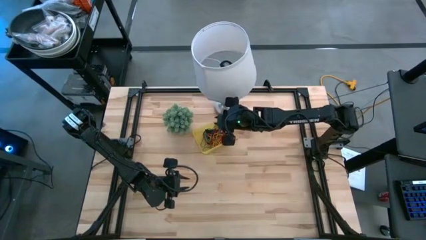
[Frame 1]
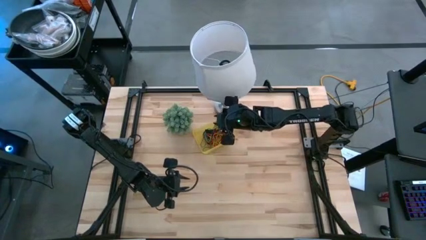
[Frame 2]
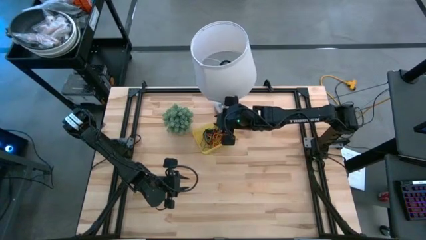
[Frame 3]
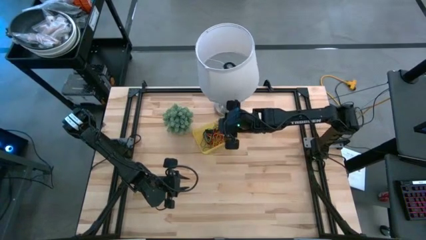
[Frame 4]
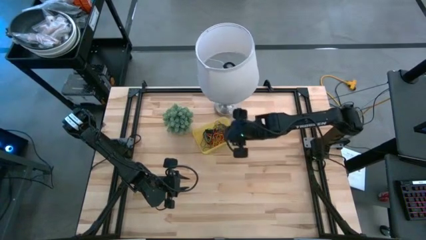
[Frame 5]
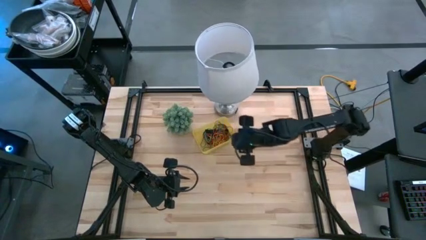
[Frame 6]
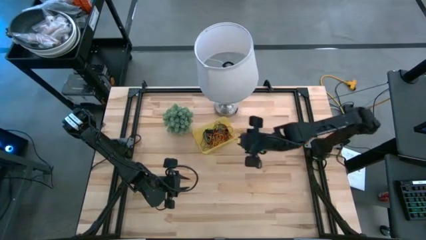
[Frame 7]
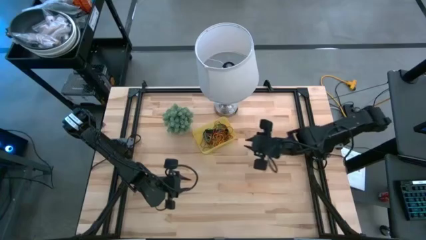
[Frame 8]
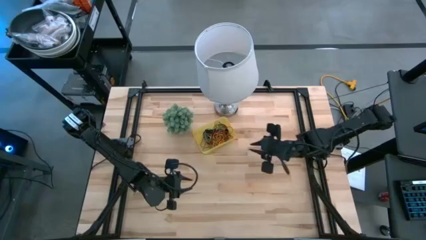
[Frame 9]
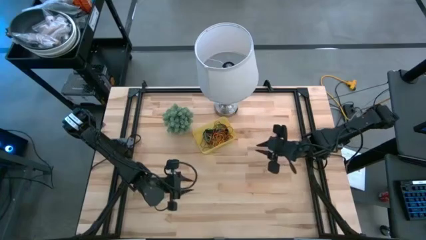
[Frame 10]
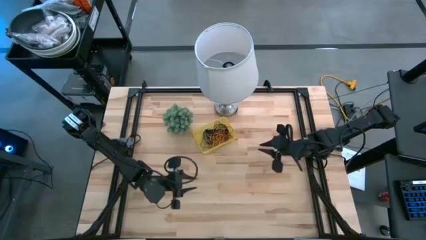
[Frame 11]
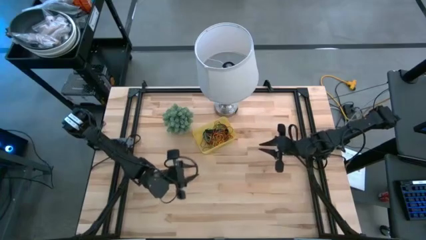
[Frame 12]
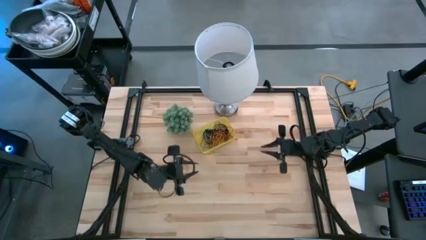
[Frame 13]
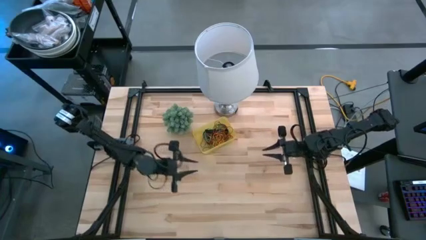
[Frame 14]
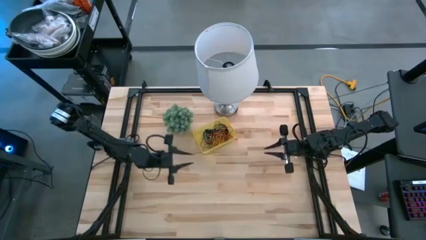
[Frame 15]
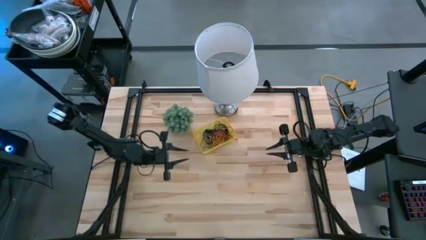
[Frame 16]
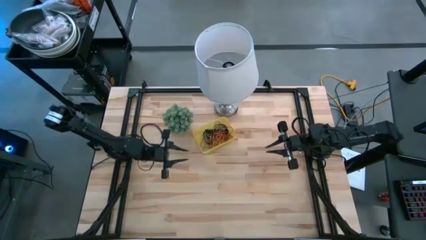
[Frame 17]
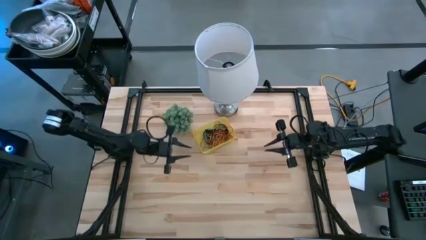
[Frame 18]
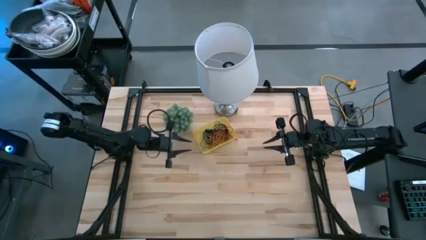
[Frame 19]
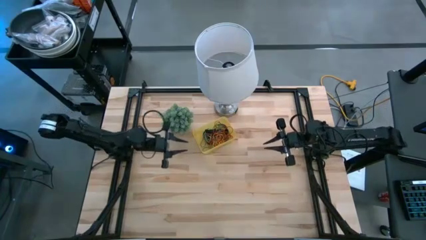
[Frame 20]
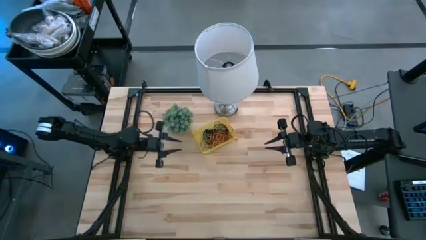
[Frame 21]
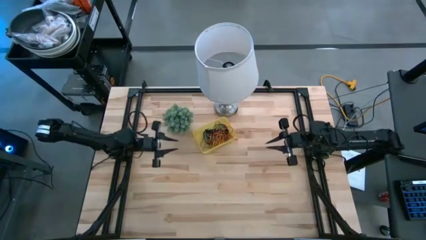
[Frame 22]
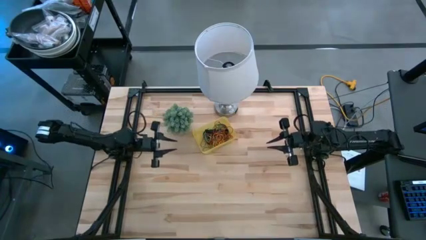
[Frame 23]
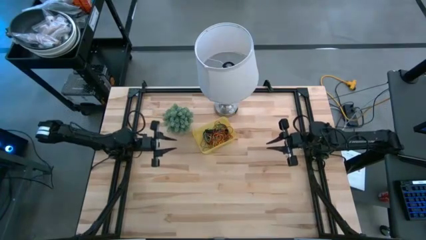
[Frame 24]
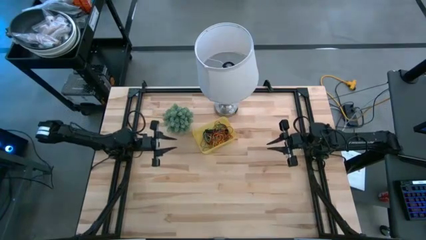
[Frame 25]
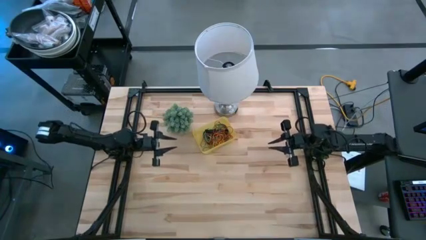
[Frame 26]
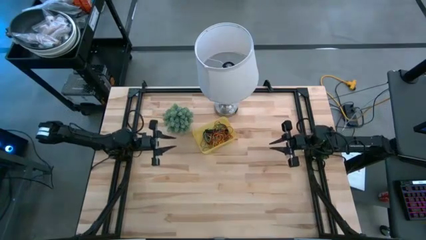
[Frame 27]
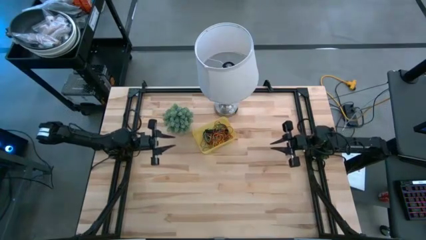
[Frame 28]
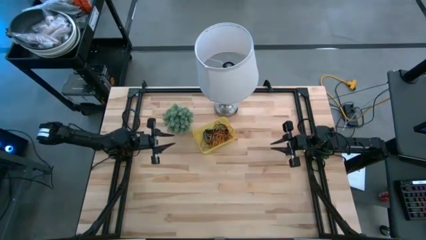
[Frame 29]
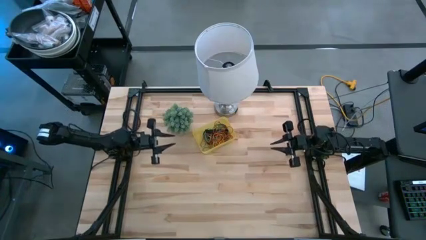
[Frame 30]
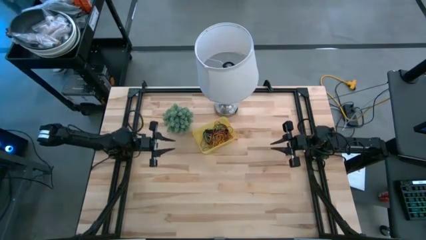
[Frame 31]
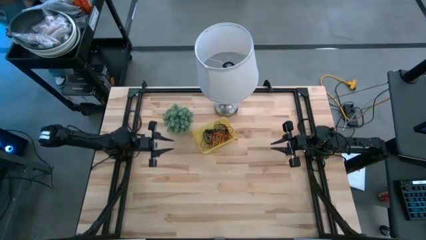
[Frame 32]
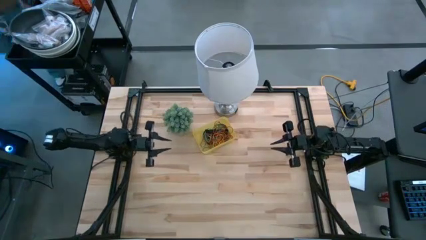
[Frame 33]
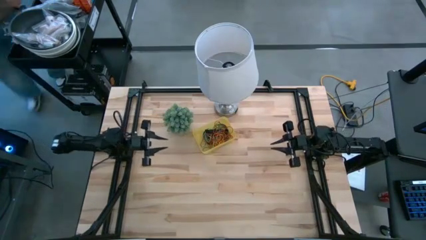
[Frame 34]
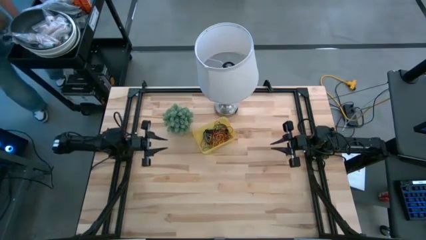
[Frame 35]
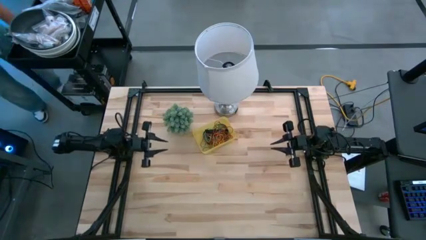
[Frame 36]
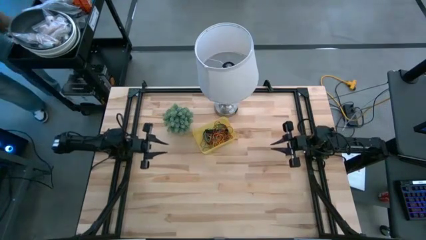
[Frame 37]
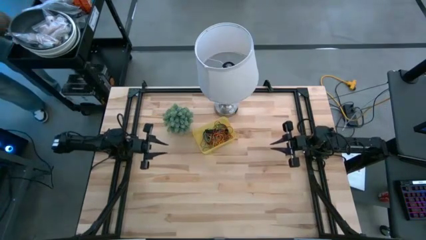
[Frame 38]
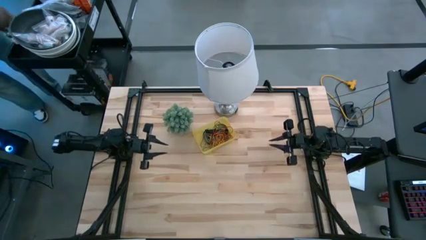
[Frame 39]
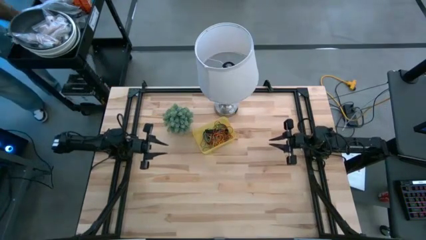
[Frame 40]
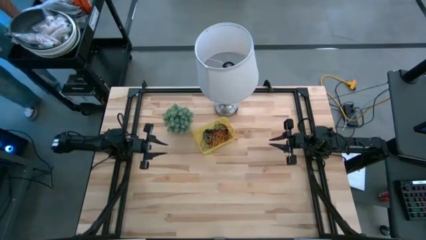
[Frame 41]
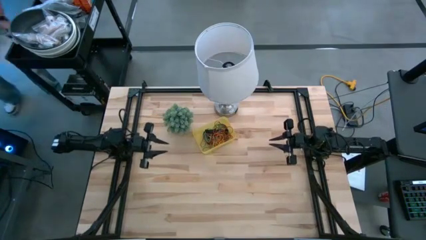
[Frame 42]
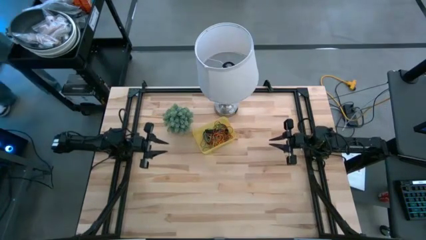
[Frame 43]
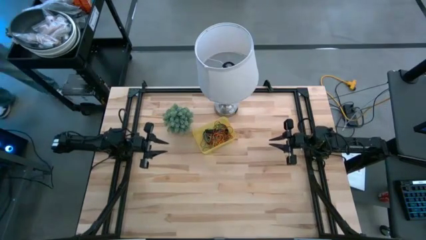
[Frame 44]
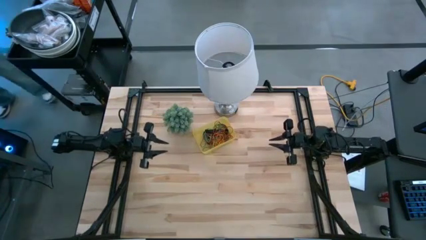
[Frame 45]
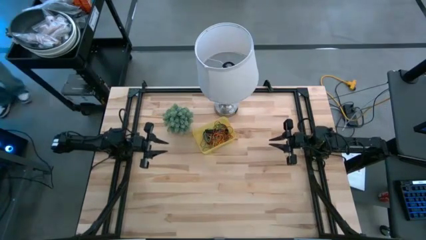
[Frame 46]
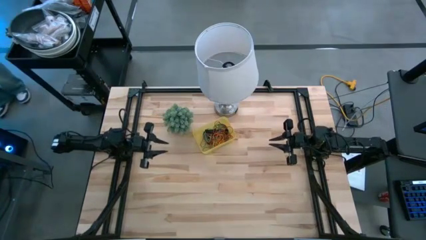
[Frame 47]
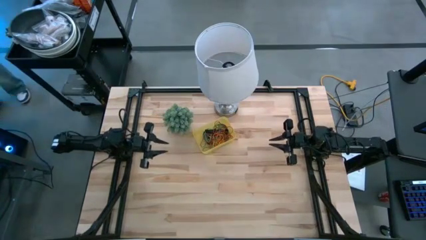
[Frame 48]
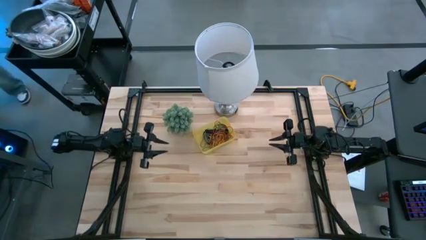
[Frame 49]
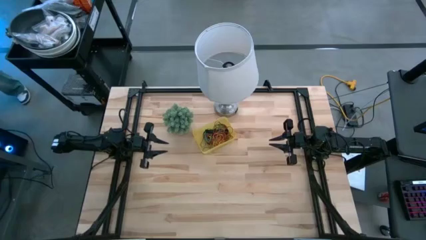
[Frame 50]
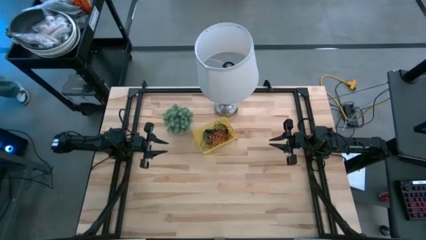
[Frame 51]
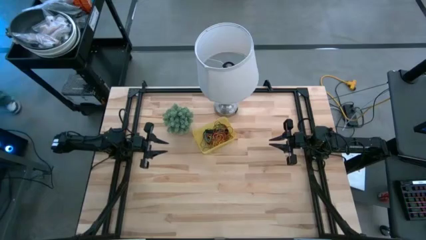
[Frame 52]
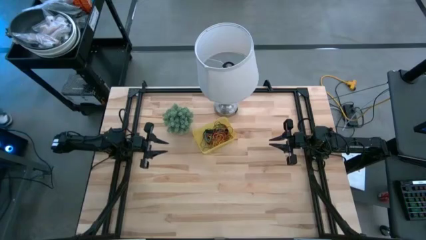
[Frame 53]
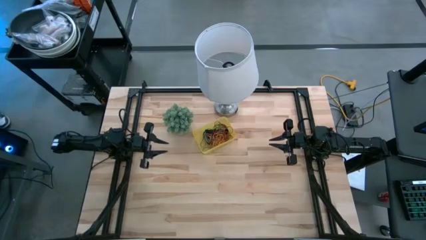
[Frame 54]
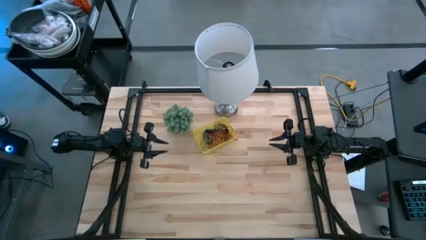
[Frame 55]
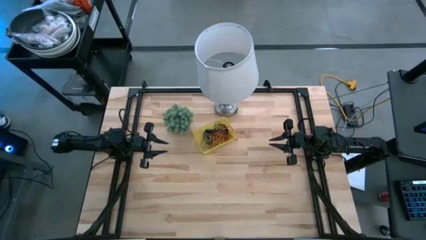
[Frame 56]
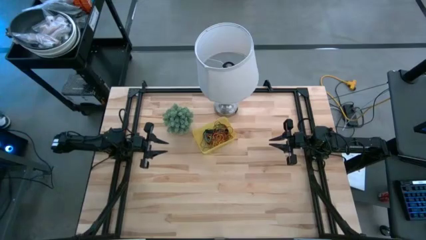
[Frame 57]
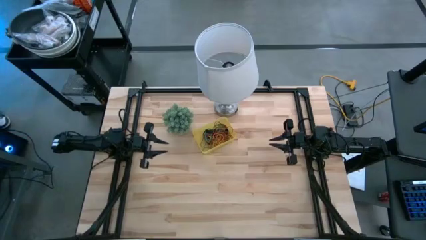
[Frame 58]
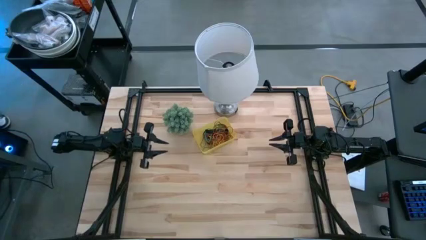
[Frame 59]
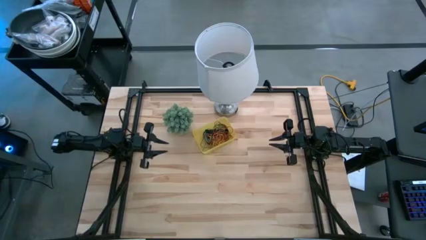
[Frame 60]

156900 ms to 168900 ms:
Task: Pick and place rubber bands into bin
Return to Home Position

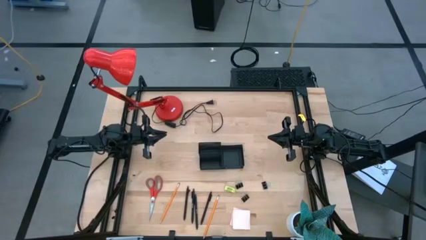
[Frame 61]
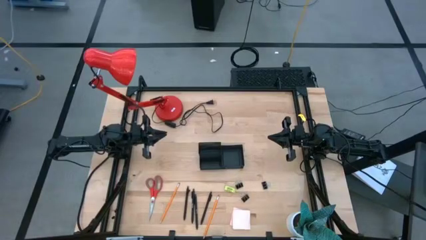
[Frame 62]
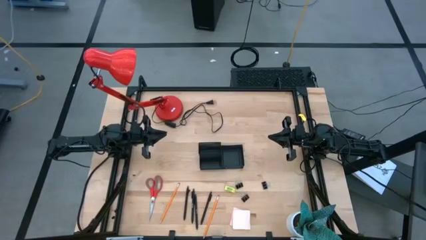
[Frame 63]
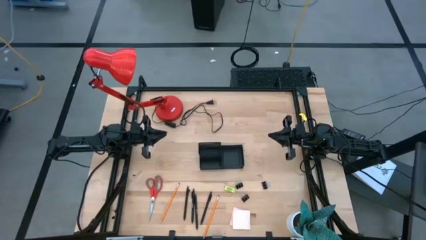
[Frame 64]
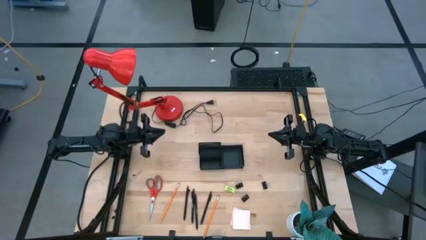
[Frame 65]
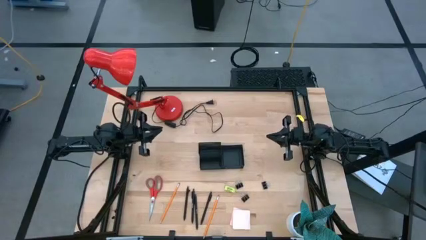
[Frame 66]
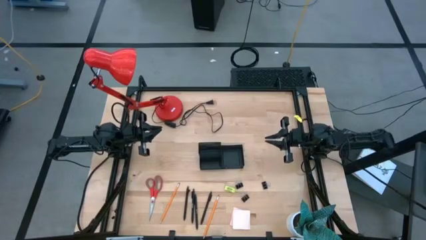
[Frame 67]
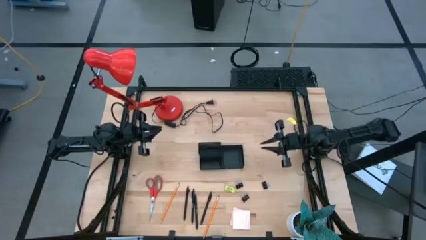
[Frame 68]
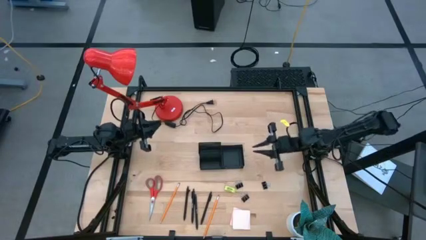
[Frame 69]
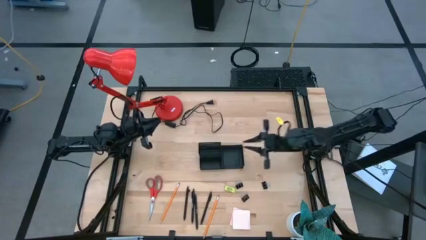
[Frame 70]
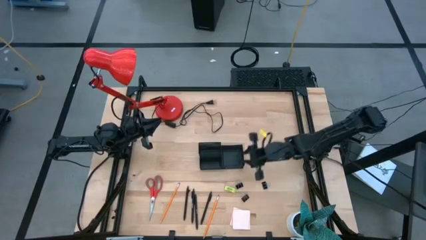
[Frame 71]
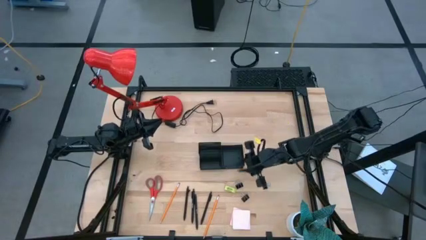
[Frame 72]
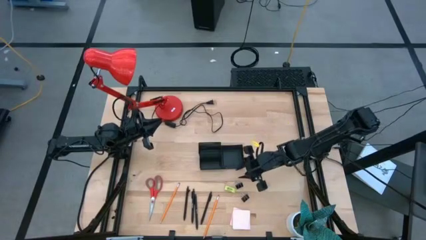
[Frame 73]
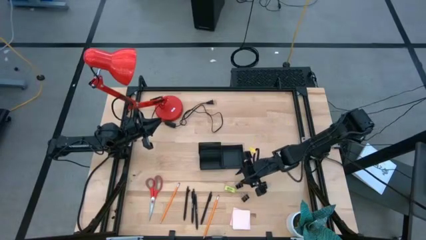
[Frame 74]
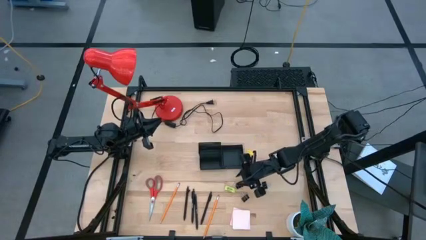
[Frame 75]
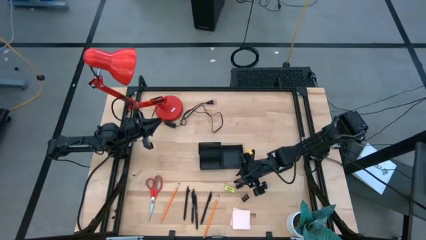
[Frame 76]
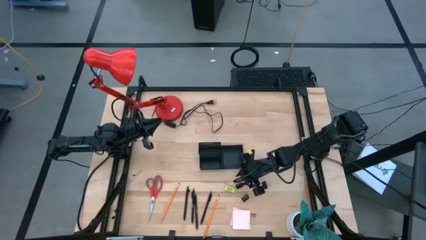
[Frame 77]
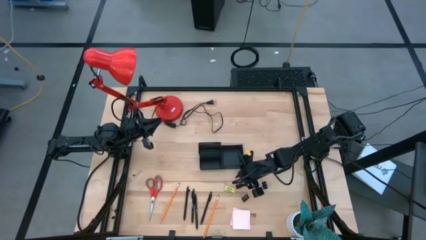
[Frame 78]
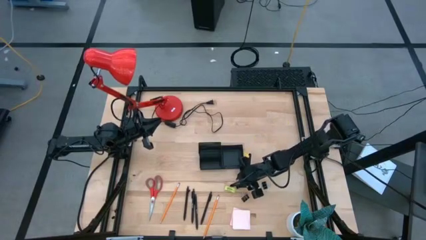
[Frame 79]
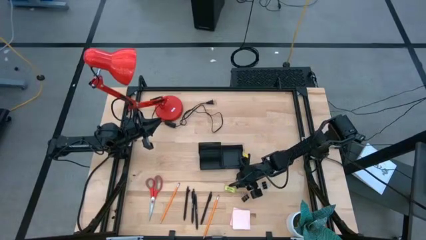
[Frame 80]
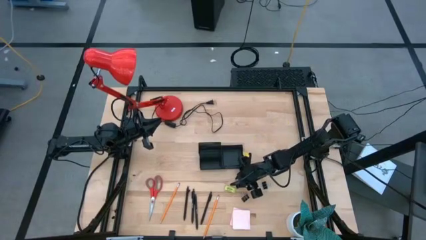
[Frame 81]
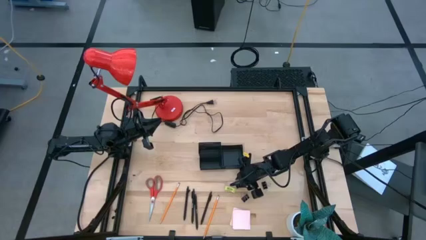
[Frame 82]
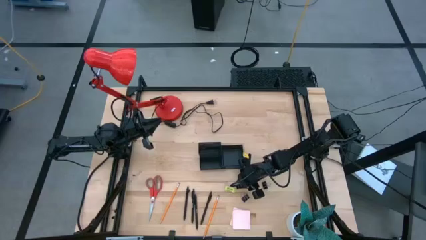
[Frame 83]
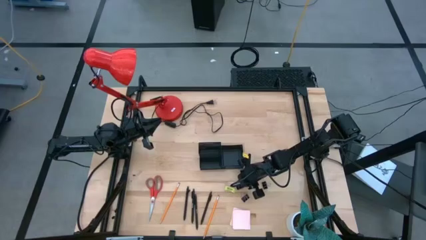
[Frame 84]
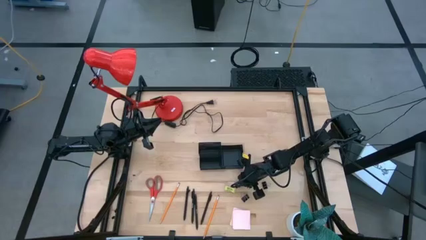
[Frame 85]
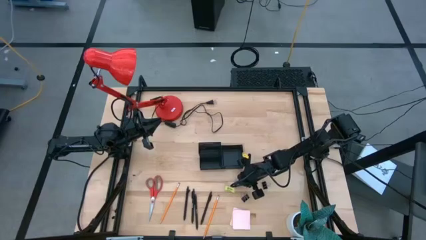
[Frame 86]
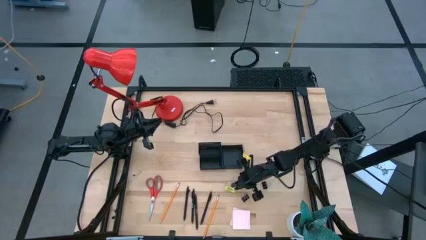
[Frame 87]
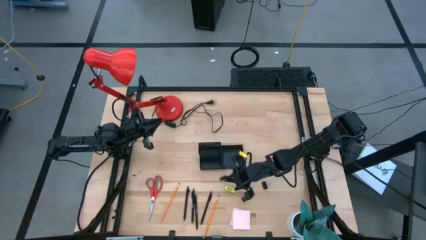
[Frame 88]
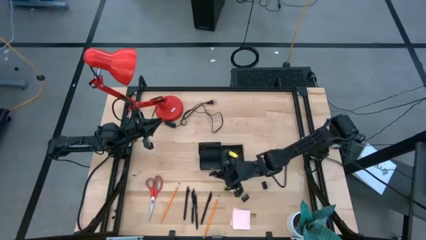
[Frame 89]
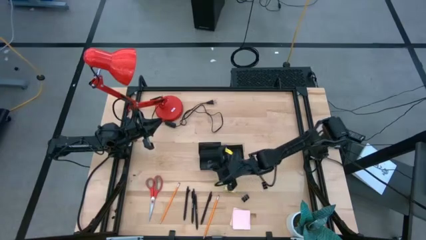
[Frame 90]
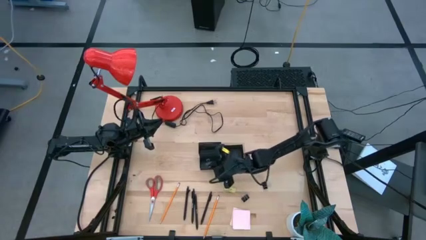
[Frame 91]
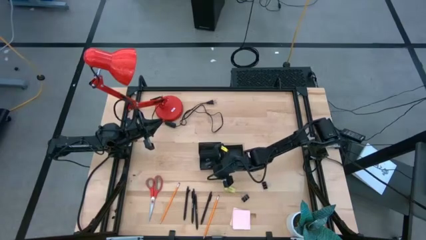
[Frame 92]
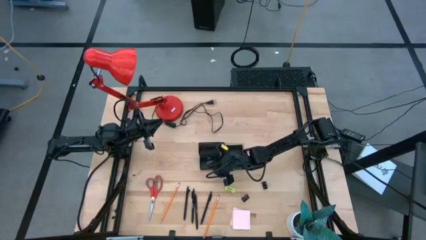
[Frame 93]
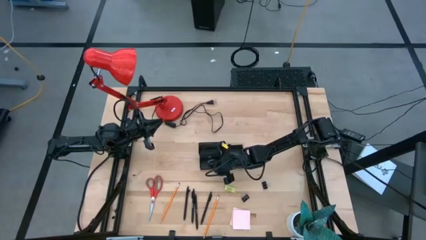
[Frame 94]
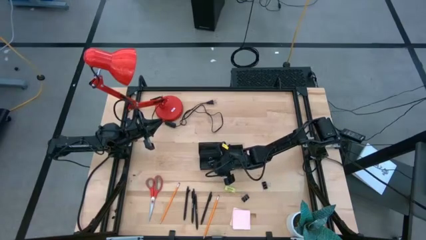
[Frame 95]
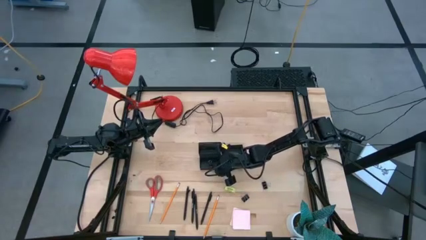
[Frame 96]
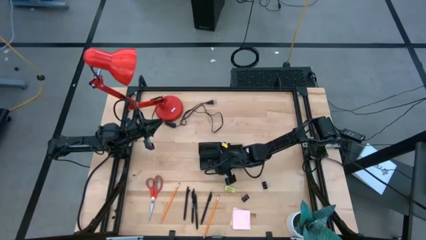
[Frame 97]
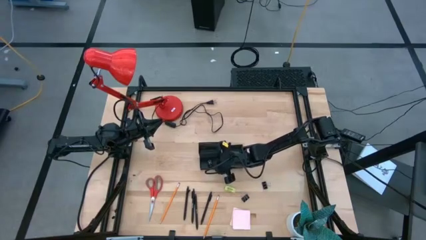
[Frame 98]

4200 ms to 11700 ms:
Task: Pick and place office supplies into organizer
Put the black binder clip into the desk organizer
